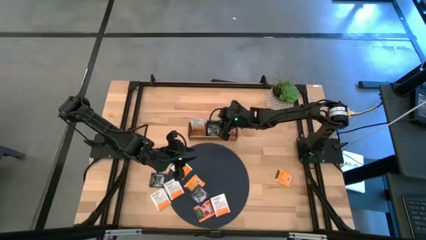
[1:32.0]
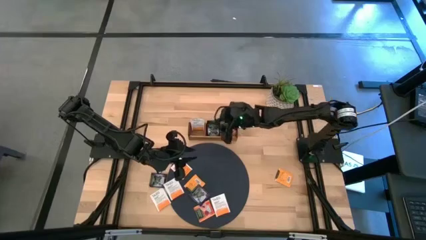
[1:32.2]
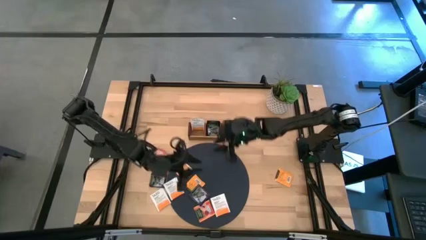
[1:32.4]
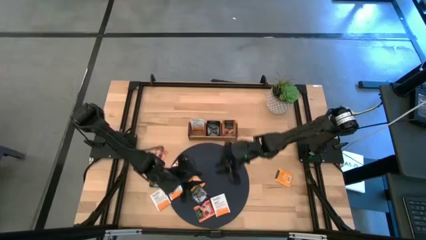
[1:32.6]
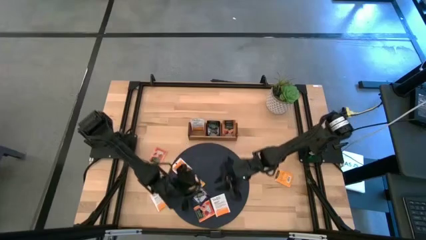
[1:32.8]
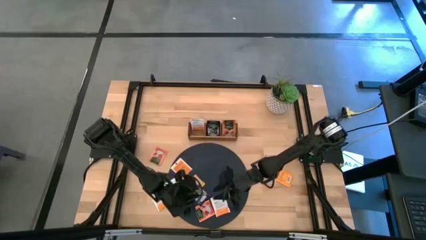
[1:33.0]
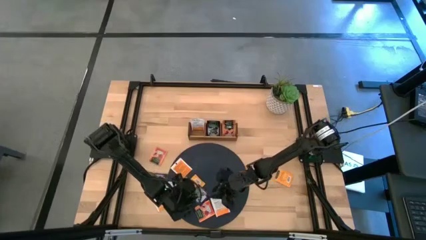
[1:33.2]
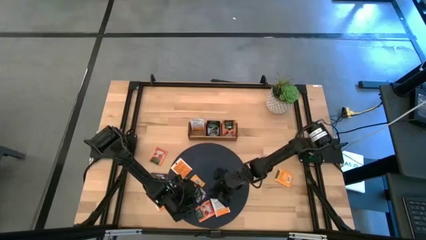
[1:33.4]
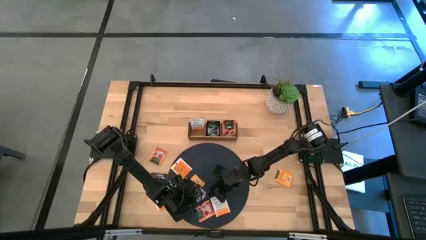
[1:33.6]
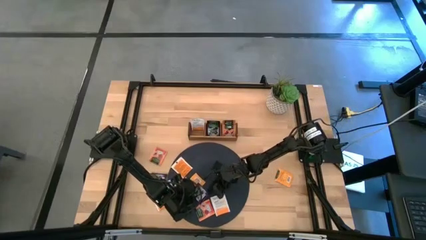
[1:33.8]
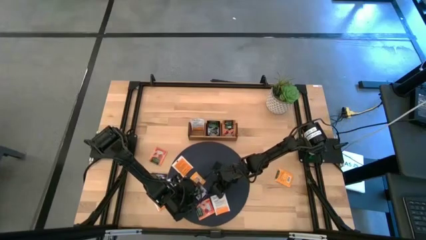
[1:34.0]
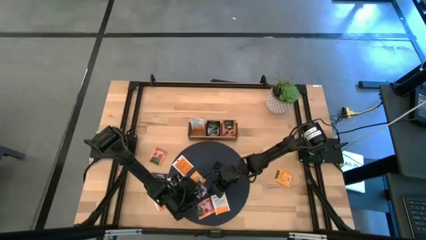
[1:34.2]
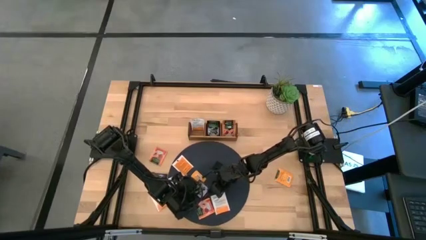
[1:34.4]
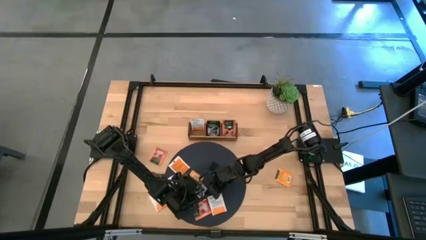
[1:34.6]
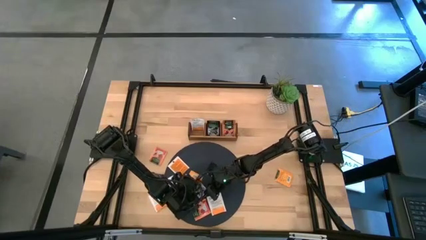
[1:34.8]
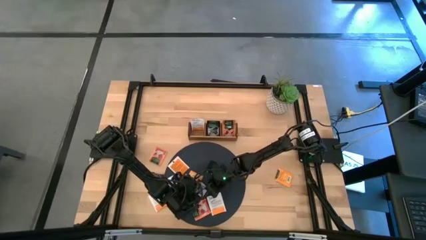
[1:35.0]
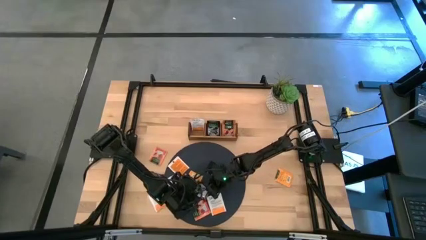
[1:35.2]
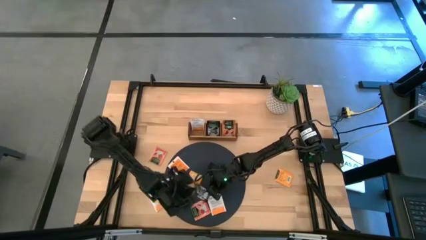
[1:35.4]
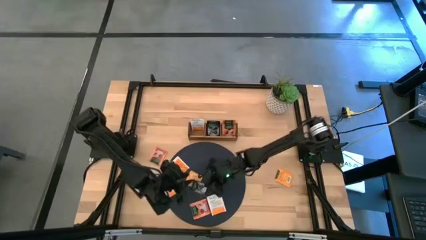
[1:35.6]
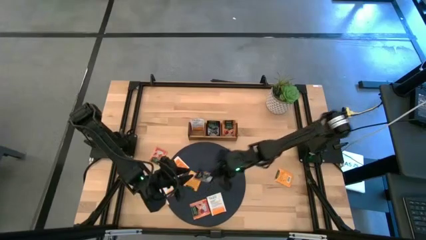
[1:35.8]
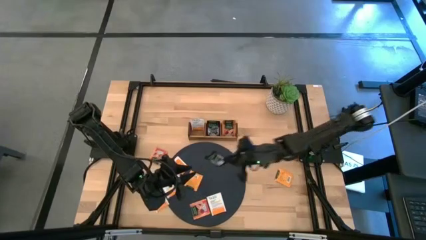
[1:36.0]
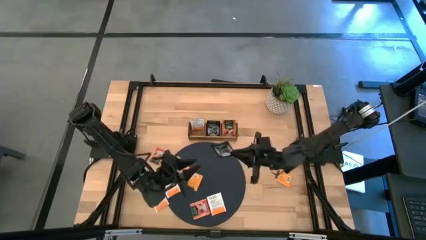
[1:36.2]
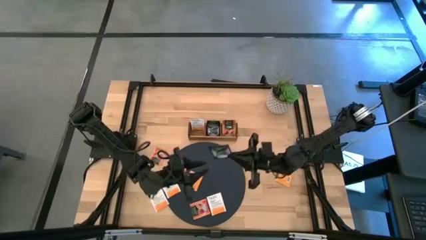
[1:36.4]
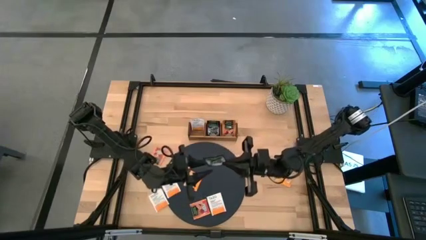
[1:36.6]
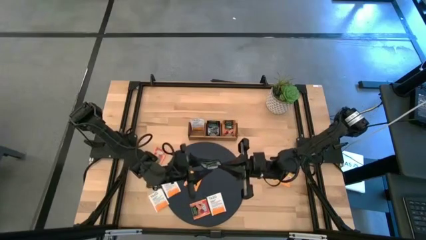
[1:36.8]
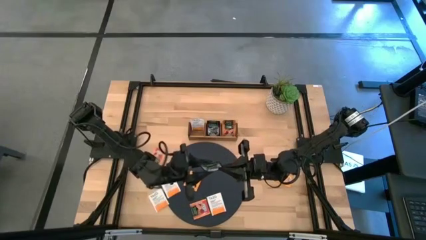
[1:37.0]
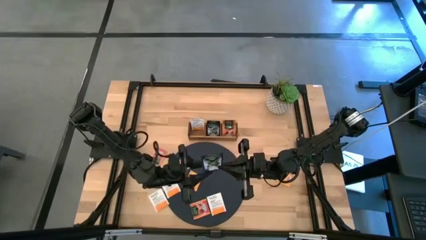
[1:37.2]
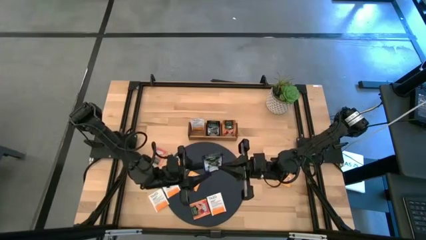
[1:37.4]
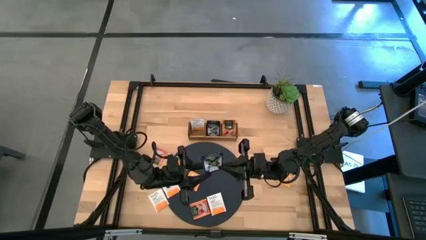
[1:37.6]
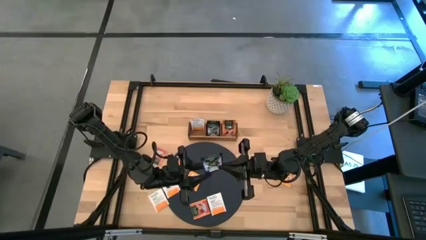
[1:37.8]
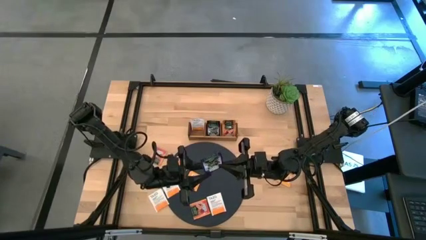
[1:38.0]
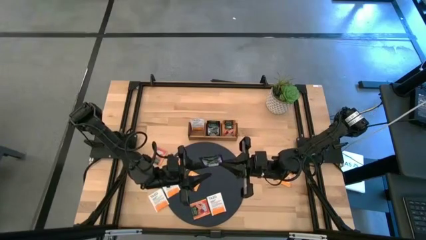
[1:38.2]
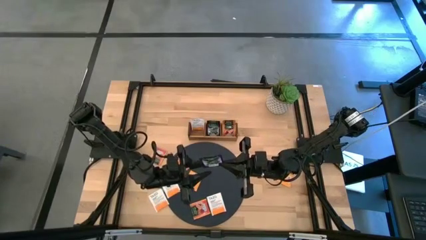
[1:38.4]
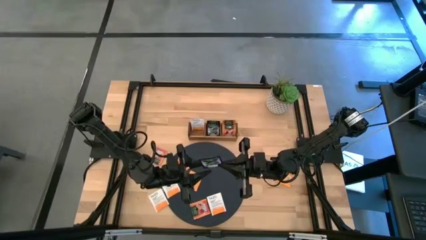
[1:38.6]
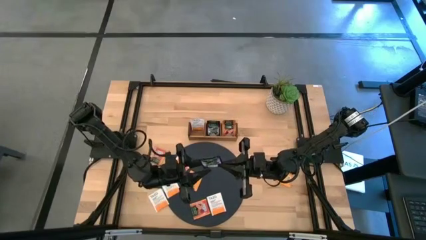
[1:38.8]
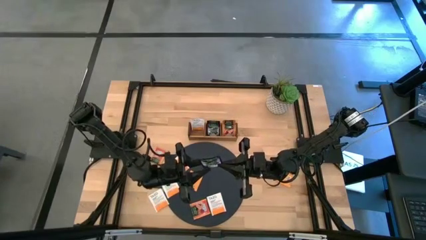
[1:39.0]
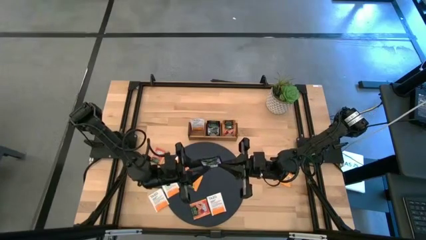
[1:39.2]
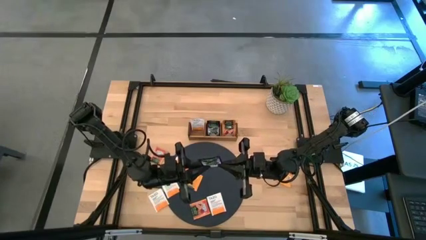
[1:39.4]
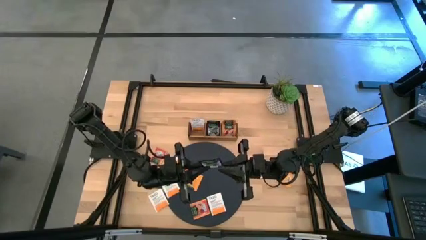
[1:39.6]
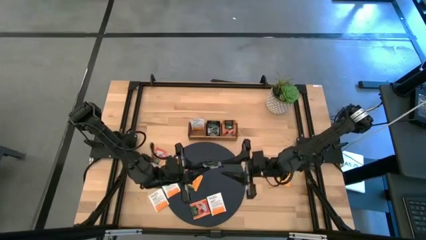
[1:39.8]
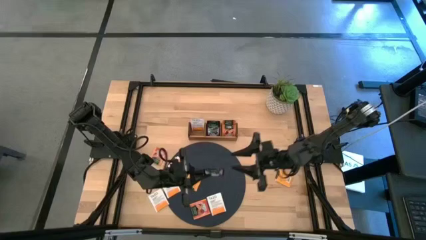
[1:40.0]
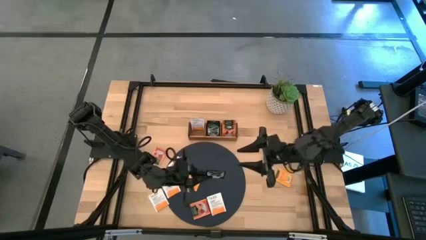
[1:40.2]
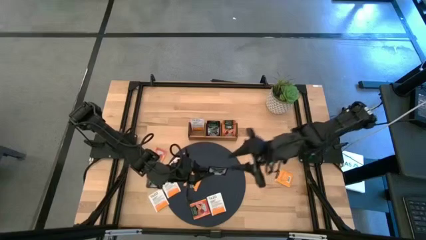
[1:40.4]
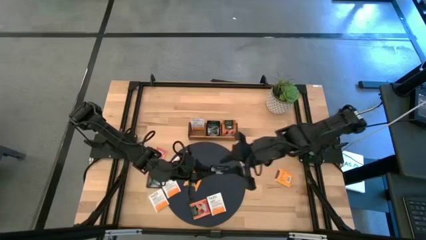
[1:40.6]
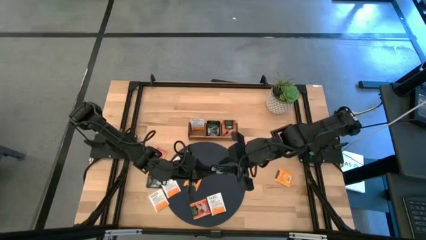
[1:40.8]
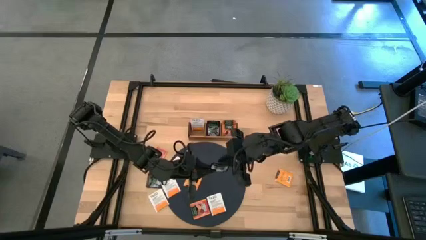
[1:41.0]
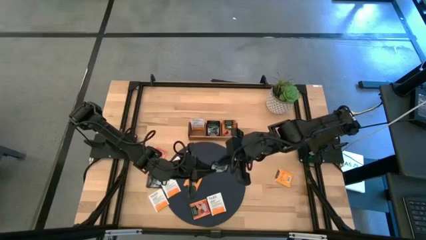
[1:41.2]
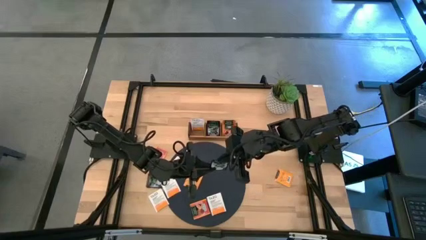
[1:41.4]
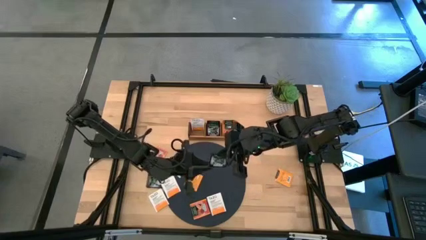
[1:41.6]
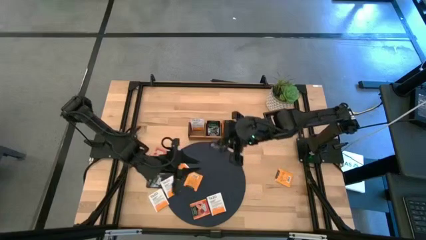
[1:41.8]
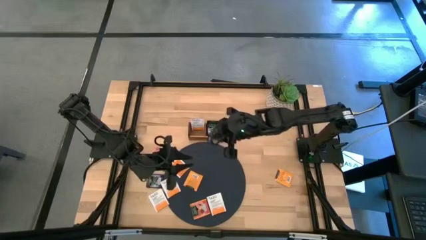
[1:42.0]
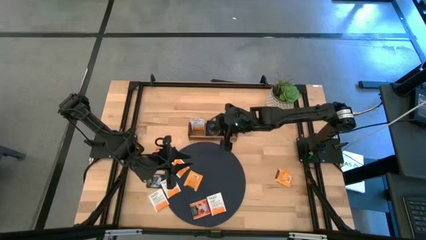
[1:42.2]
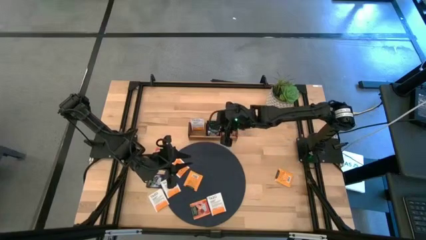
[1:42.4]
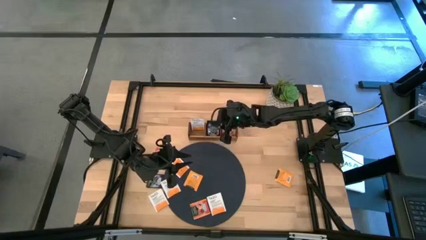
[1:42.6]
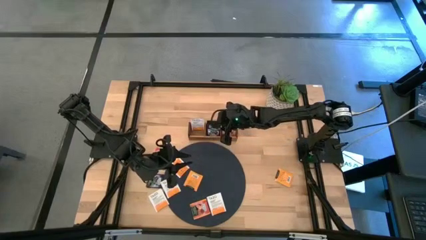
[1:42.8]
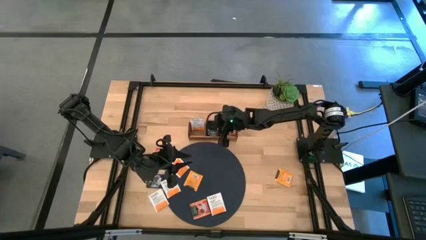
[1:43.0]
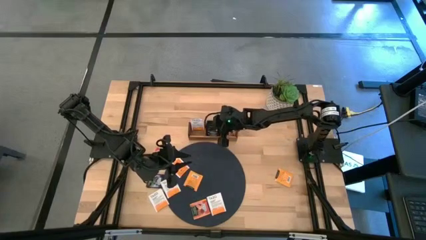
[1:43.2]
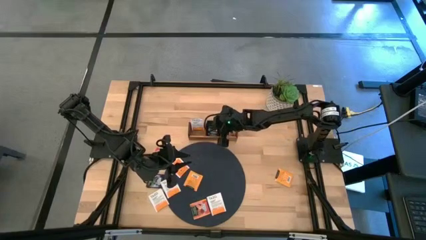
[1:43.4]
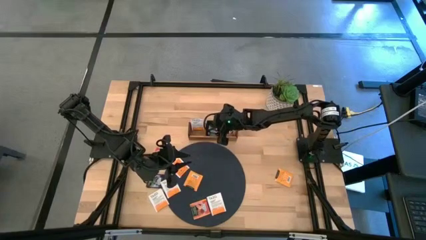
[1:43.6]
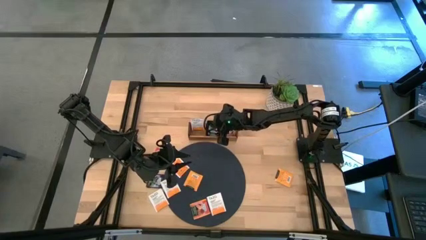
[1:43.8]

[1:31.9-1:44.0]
Task: Pick & Place Tea
Put the violet tea bag into the middle of the wooden organizer

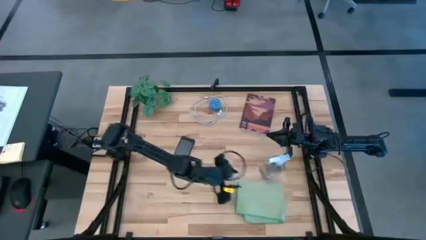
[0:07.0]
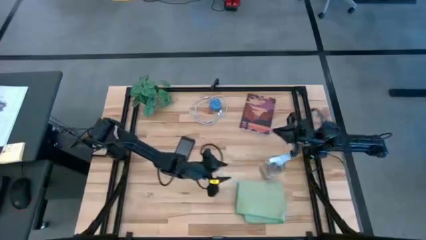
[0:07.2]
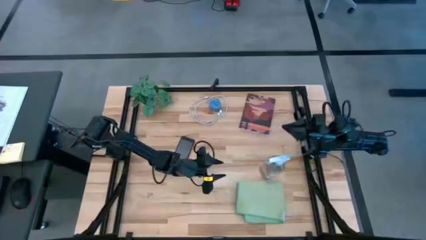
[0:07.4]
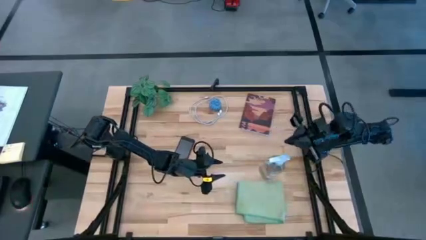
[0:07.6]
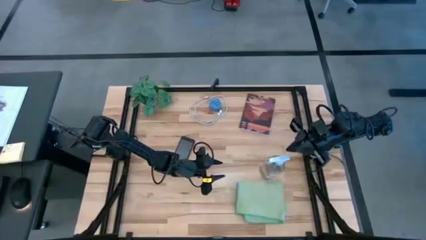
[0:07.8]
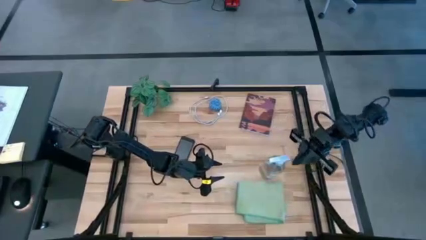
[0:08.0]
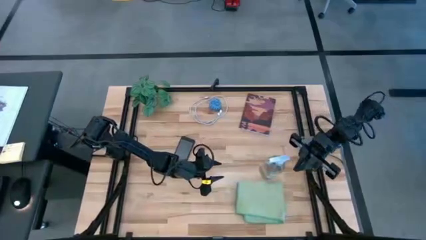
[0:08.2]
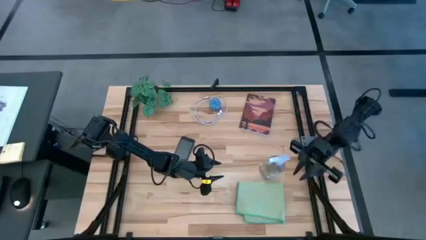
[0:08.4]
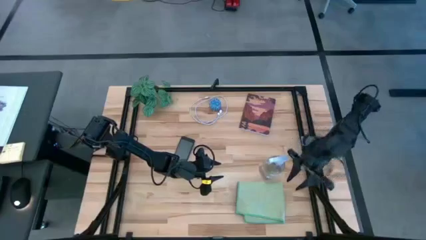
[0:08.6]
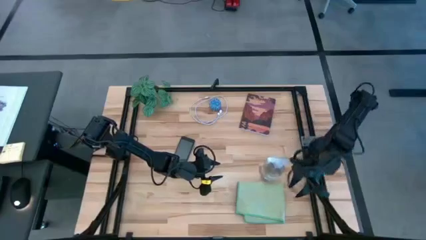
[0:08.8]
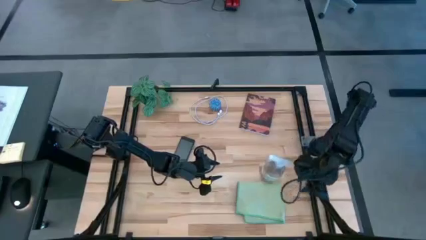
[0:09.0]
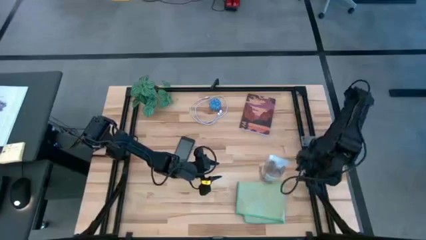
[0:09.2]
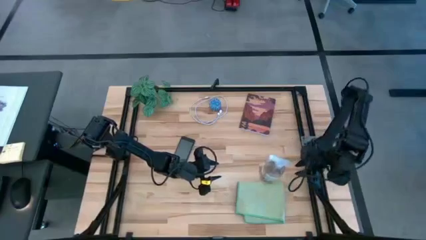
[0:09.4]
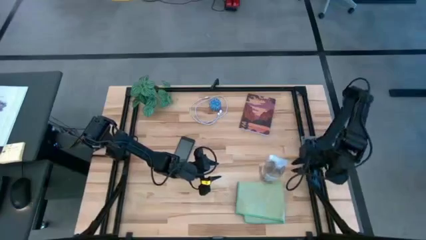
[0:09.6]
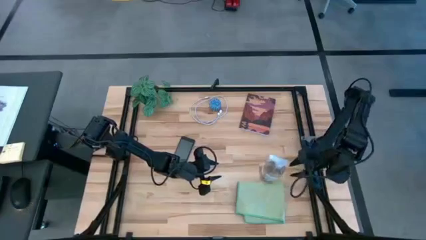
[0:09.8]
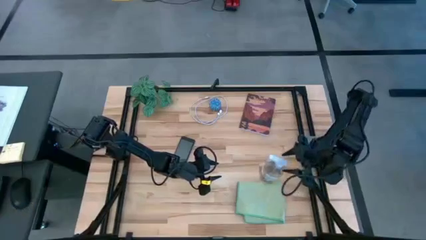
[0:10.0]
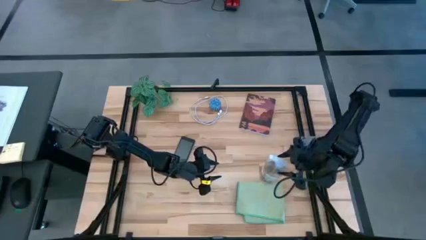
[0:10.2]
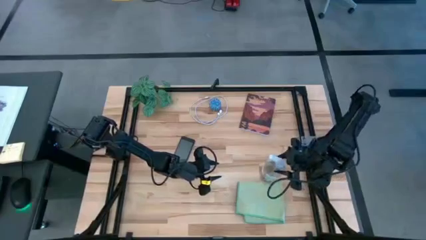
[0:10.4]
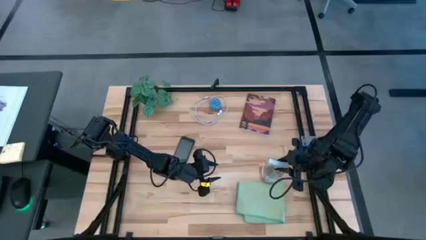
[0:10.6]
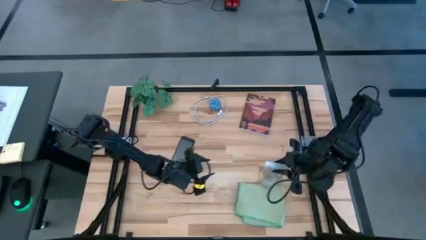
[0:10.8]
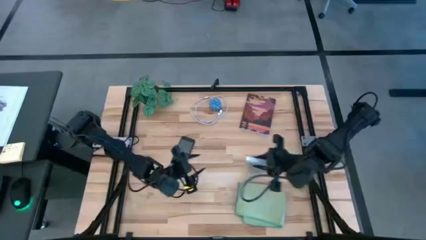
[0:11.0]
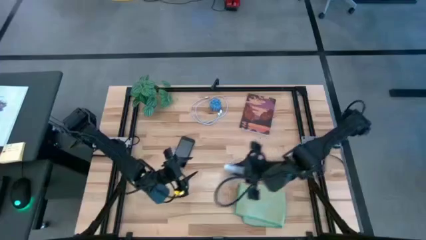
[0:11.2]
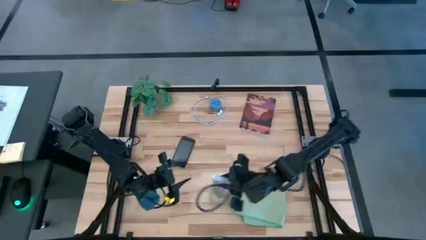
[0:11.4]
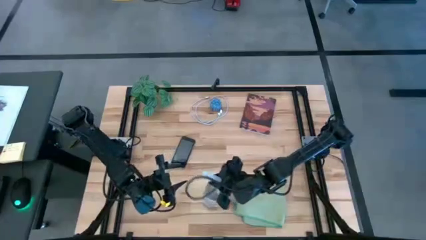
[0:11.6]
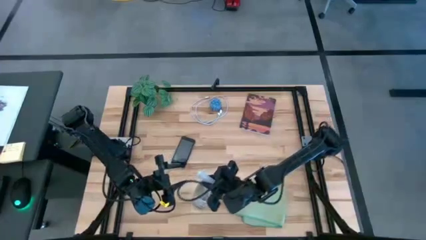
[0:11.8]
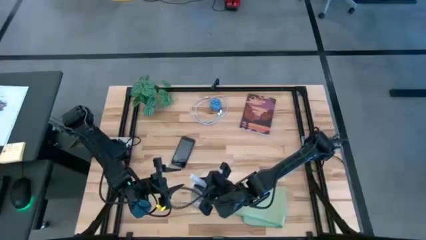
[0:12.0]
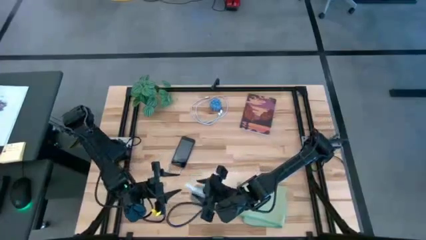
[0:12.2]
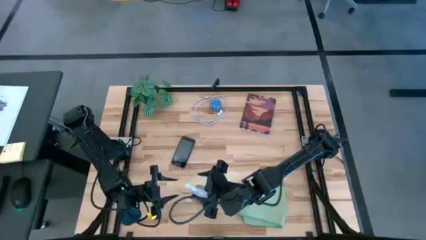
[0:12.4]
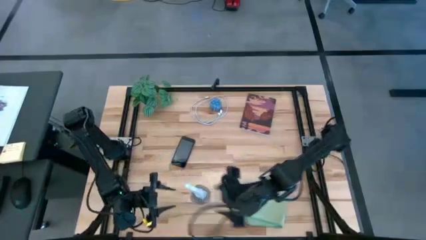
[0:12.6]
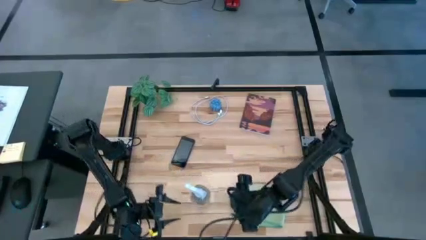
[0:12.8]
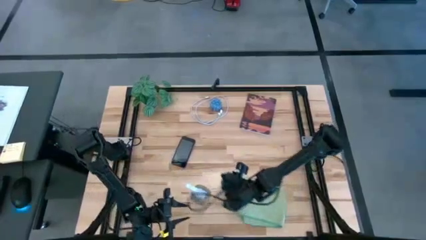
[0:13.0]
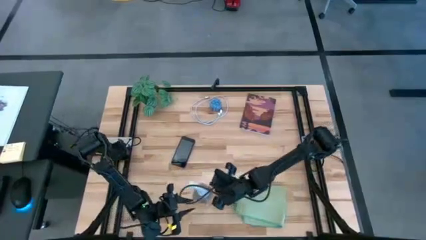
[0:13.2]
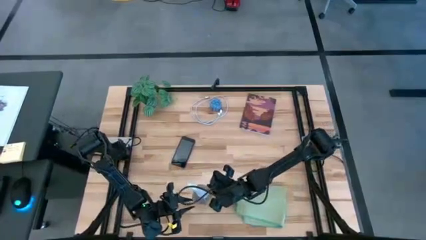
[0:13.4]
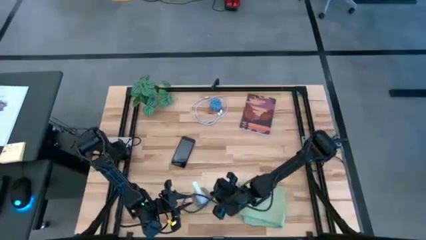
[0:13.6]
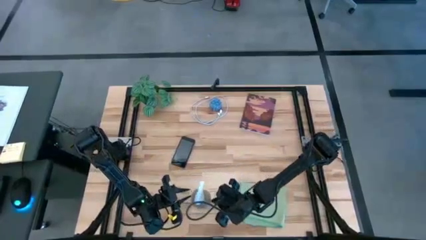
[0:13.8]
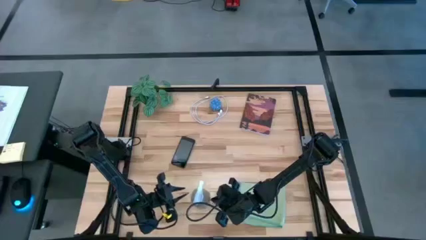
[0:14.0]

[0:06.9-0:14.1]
Task: Apply microfiber cloth
Move the spray bottle to the bottom center
